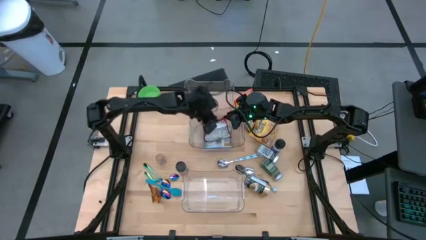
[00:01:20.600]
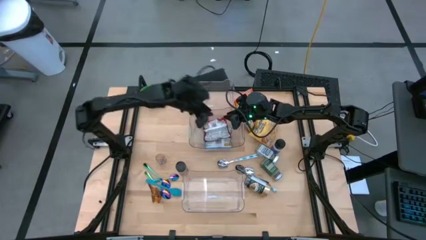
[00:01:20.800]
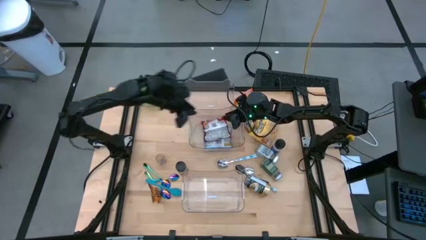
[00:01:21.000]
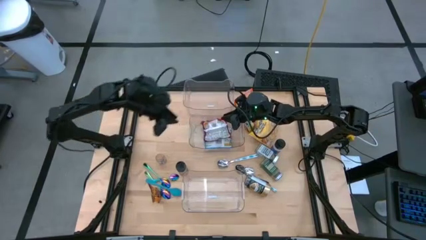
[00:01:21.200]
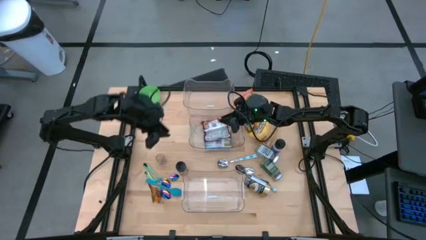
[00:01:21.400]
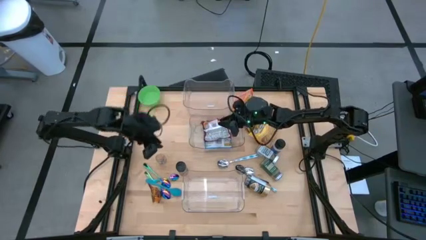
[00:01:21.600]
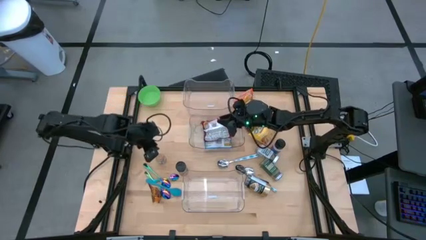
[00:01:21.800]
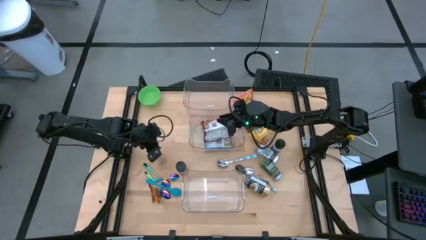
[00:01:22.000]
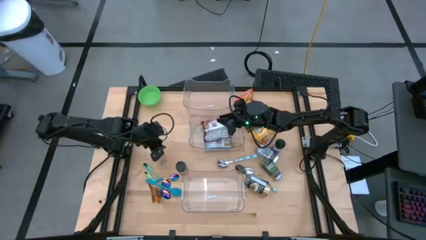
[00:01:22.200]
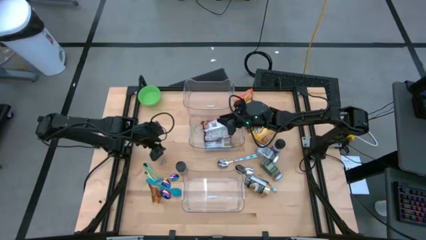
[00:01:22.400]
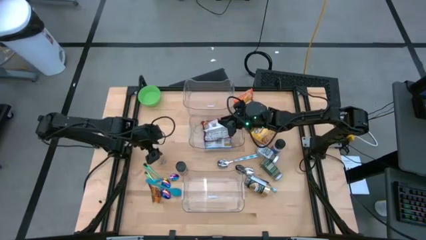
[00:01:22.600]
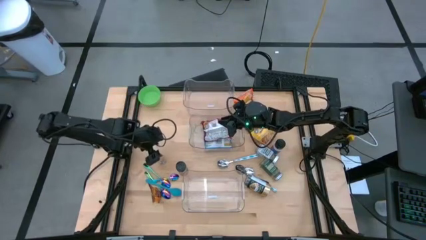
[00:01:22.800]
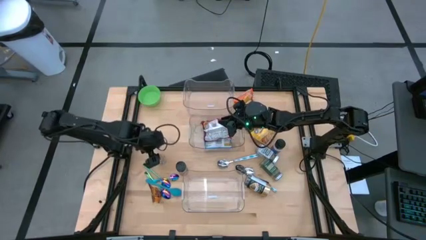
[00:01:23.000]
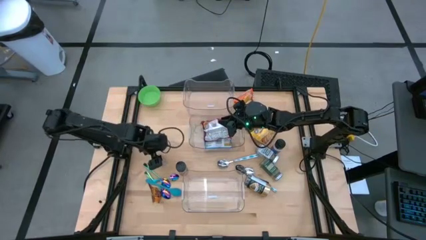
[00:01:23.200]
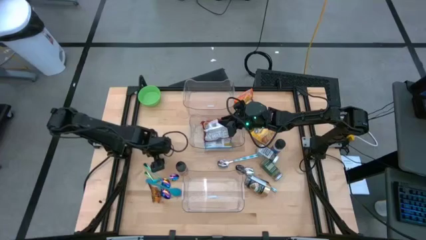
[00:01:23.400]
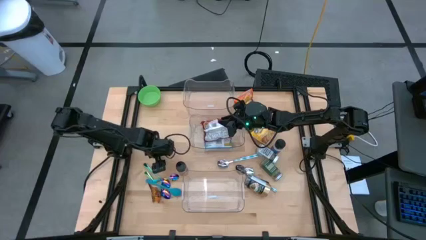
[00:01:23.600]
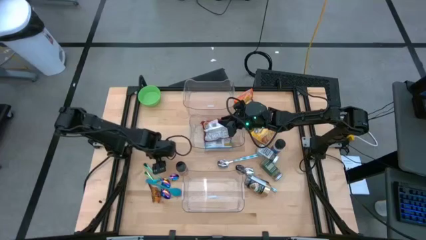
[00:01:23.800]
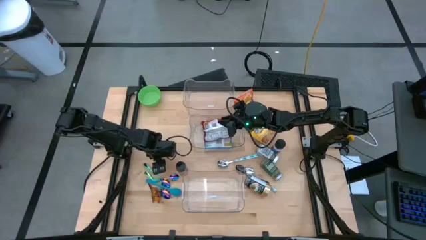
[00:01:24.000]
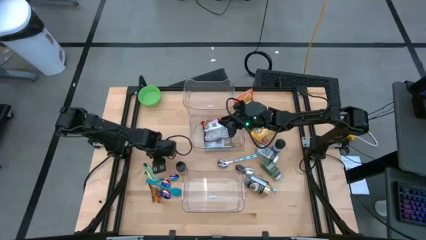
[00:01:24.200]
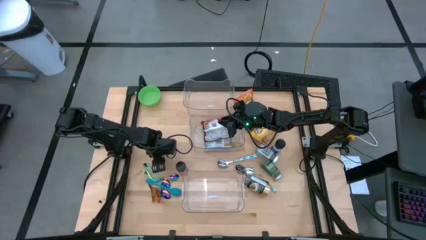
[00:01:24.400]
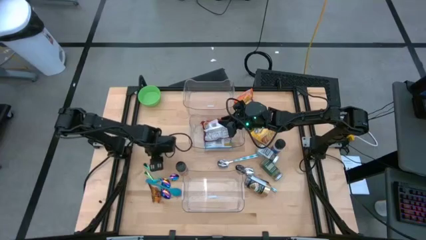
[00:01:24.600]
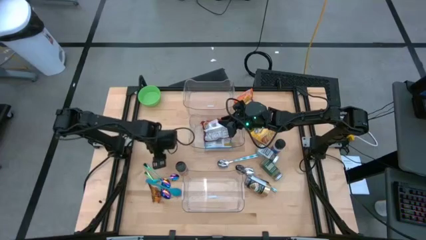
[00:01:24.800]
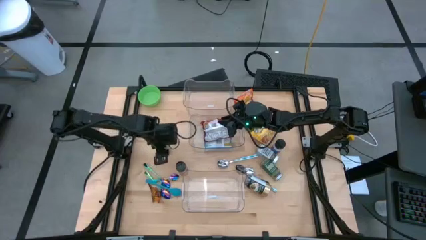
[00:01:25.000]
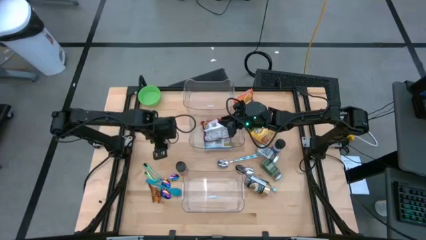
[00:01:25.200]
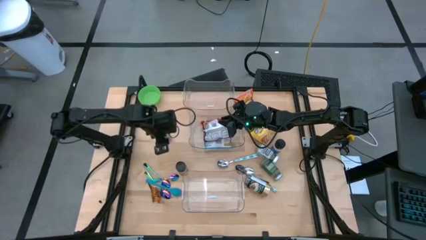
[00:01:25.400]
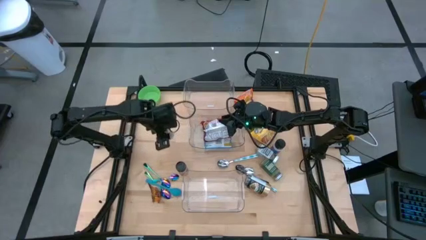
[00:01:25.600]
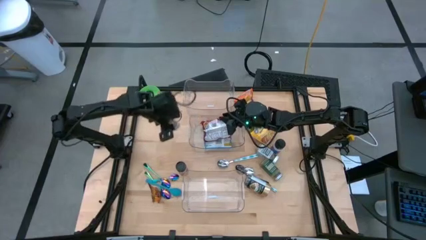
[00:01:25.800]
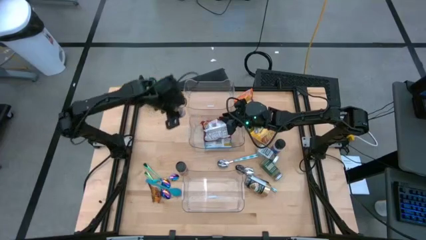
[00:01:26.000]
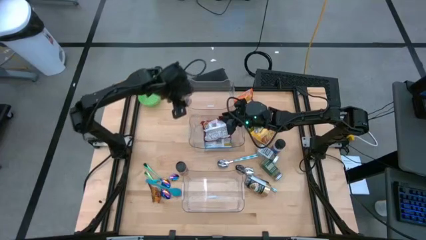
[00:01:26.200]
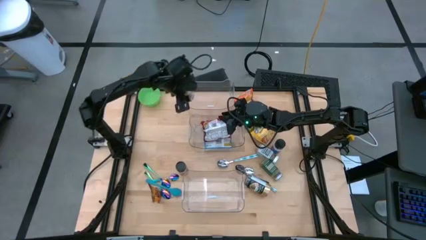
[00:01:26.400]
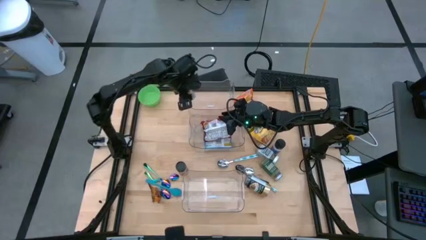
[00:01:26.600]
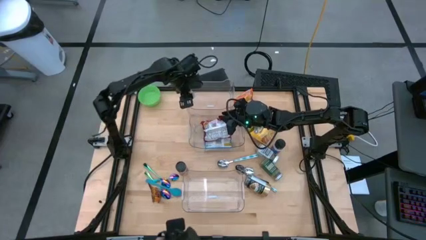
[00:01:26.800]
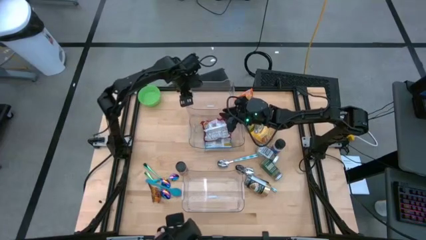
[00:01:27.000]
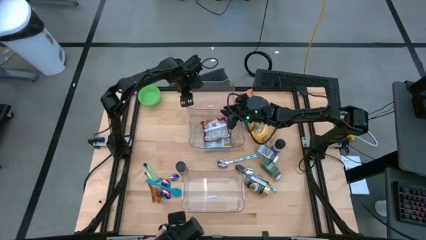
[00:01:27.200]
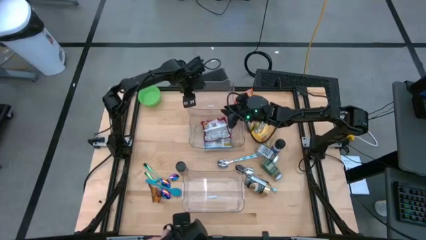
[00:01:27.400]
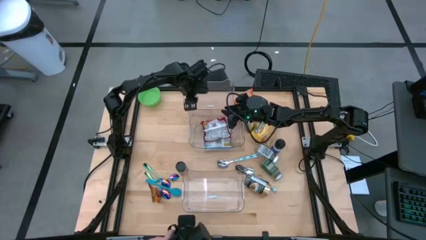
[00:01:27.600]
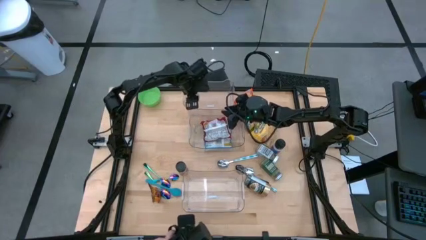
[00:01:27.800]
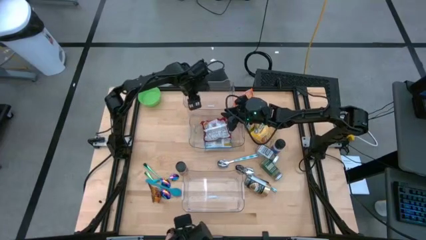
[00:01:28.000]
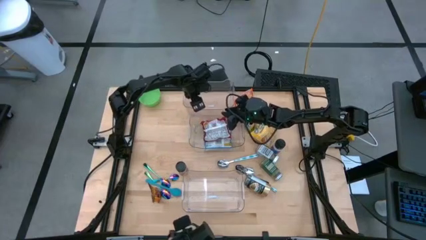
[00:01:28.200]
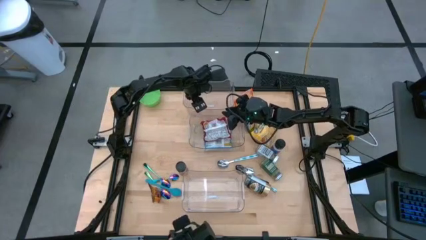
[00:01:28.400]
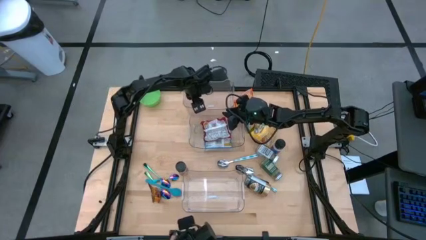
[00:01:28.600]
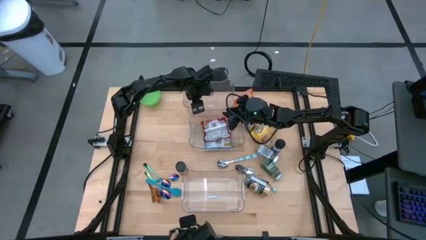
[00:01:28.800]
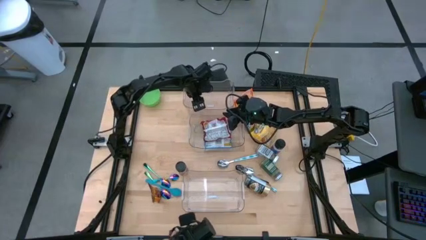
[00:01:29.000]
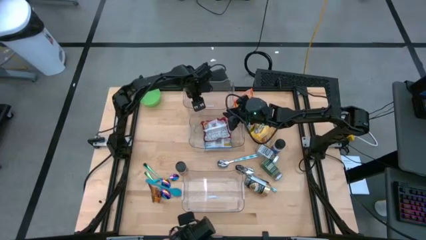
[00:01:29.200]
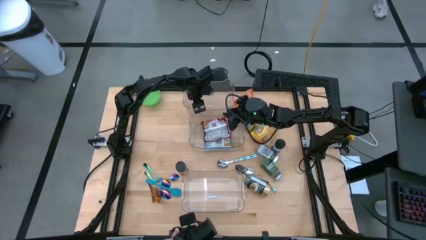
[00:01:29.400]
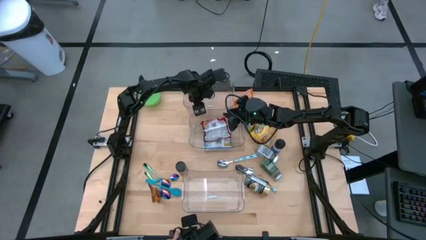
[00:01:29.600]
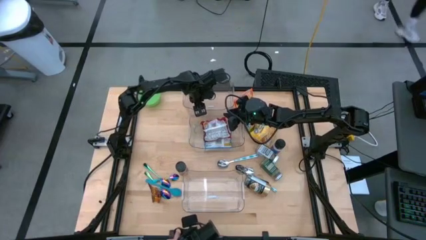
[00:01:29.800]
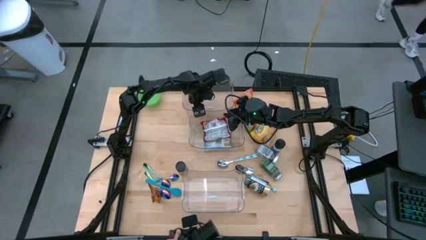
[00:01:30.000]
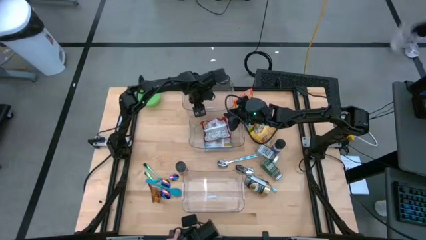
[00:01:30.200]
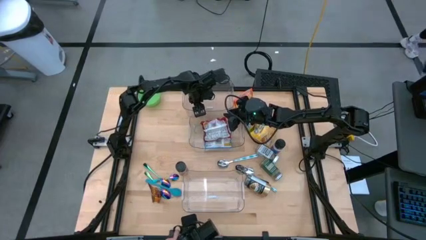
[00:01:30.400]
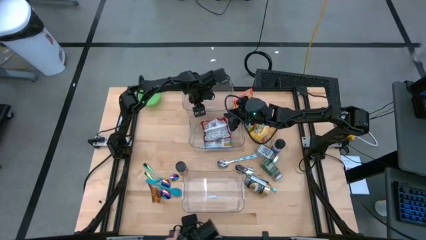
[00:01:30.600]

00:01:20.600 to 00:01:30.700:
Task: Pick & Place Food Item
Put the brown seasoning bottle into the top transparent bin
